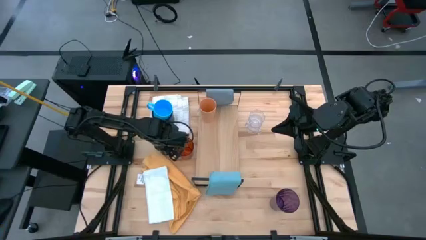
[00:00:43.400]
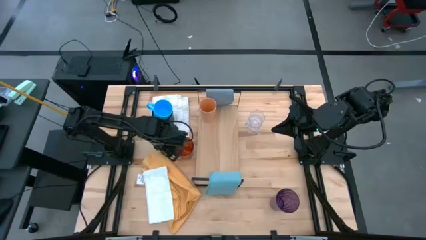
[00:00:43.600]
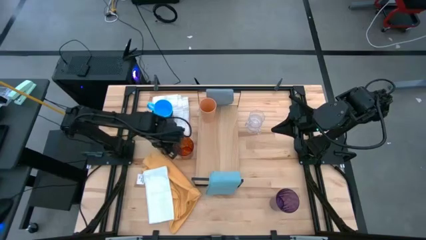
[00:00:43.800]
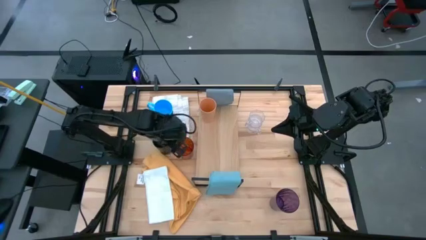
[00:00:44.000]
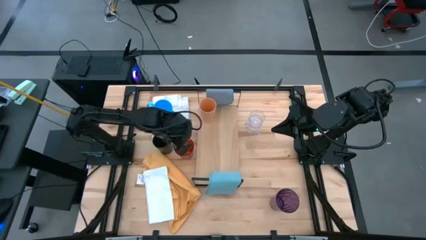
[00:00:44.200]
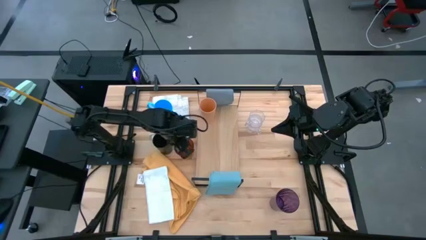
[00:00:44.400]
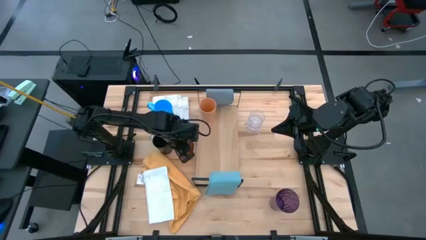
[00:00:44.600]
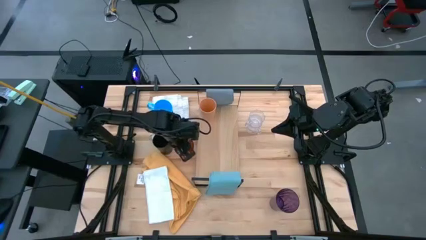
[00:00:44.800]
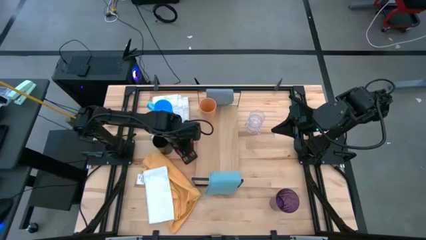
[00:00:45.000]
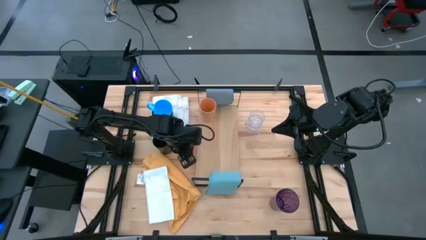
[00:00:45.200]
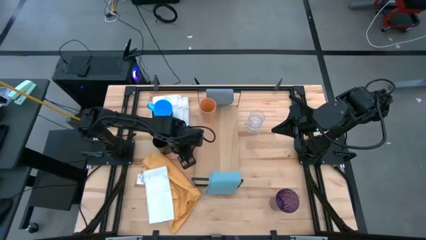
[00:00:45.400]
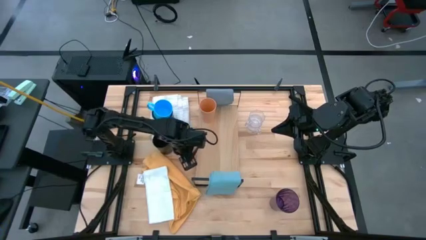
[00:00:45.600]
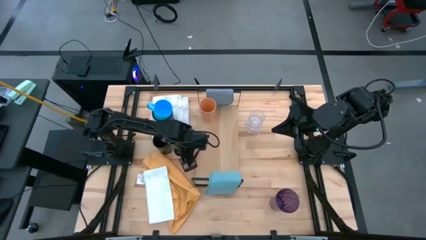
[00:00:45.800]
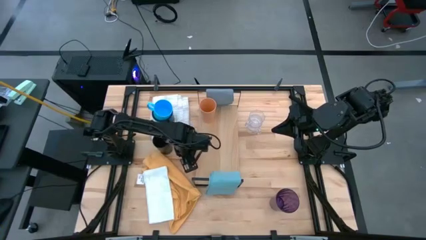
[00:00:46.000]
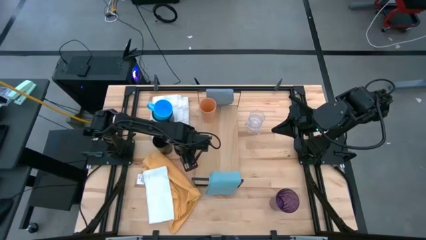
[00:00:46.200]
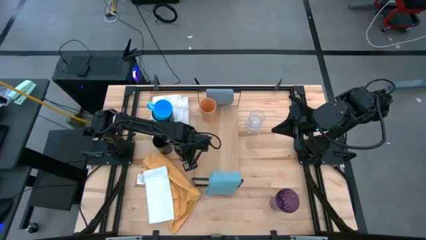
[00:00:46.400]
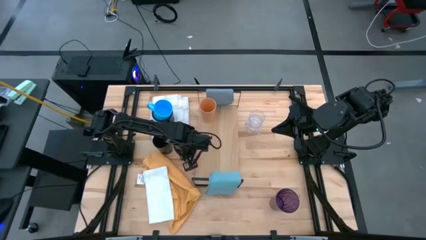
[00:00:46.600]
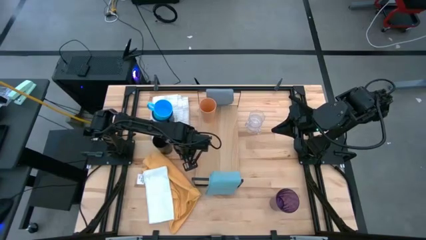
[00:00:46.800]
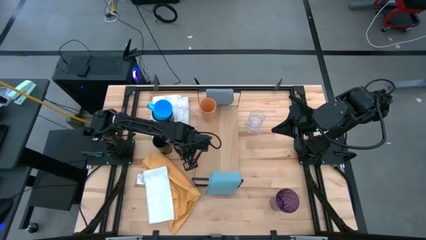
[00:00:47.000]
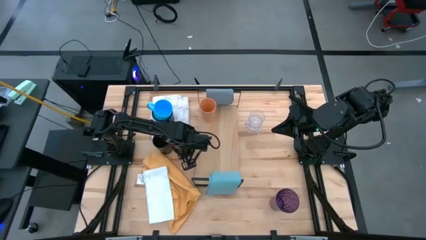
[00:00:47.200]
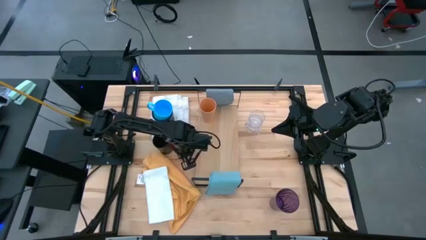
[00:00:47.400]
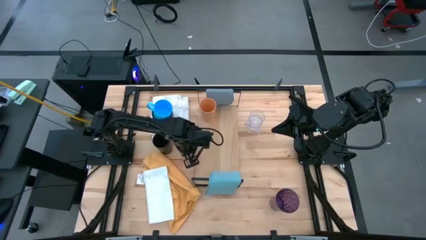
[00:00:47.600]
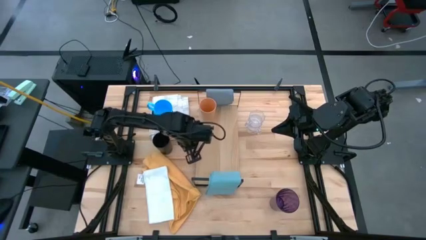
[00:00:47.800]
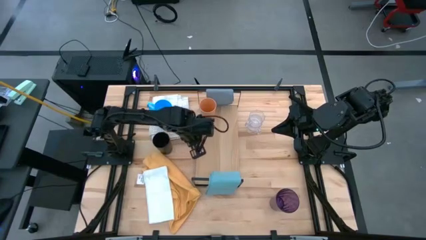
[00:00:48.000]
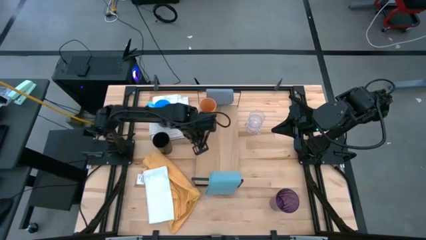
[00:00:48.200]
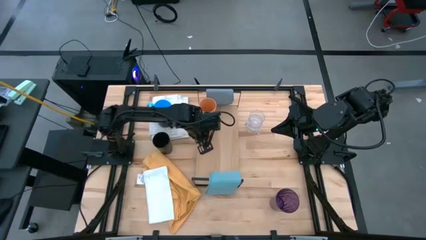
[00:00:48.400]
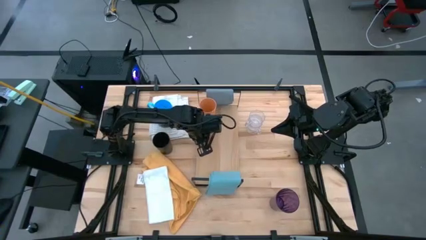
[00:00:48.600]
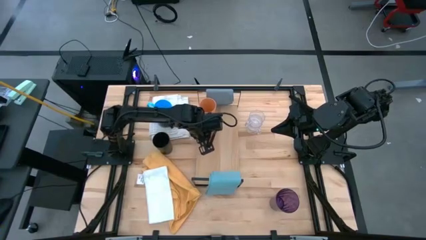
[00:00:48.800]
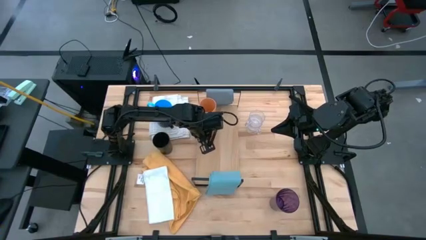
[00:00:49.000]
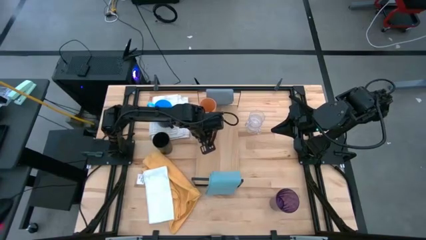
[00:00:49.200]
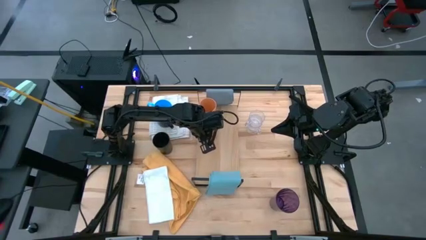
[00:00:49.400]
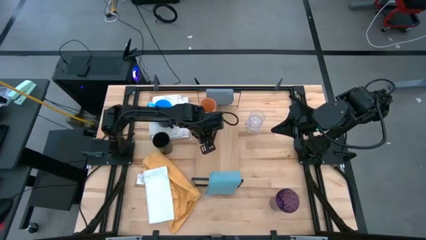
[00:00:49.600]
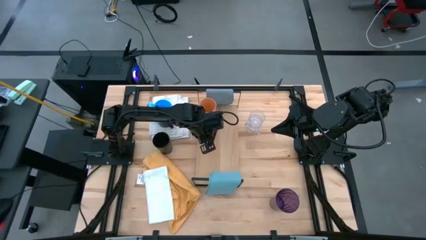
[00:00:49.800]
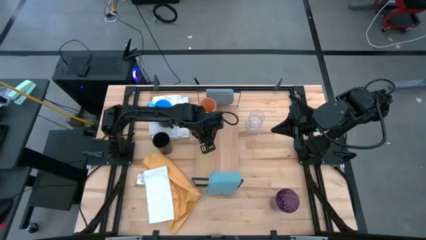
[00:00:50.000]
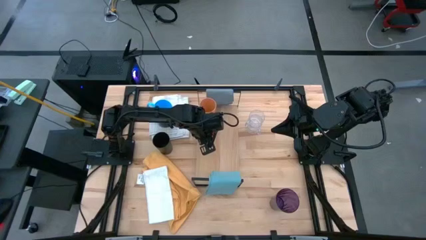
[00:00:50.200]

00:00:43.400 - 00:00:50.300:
Task: Stack small to large cups/mugs on shelf
Put the light orange cup on the shelf

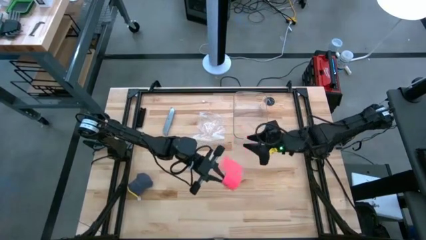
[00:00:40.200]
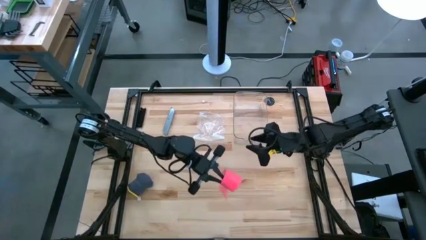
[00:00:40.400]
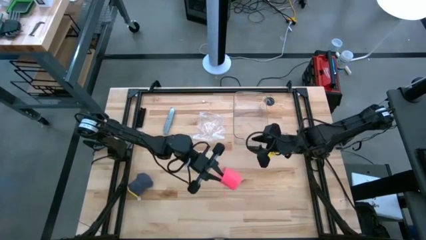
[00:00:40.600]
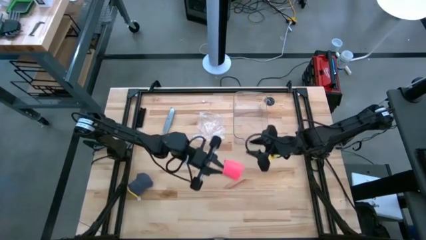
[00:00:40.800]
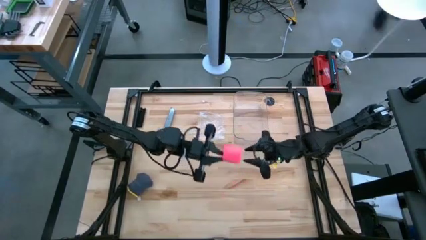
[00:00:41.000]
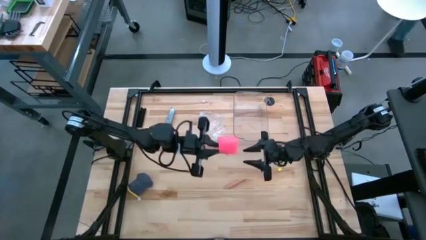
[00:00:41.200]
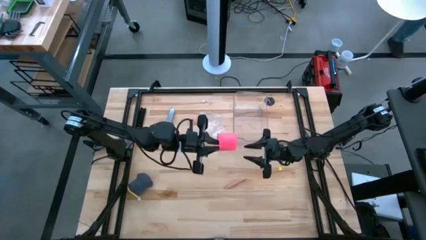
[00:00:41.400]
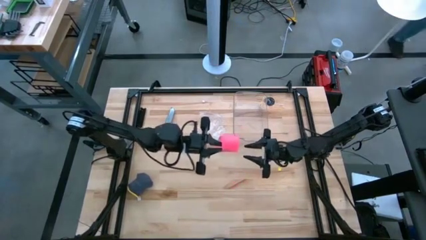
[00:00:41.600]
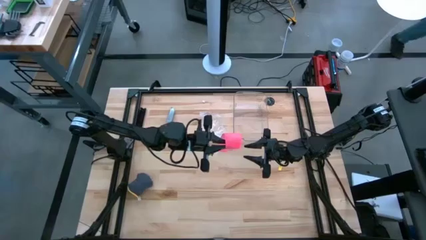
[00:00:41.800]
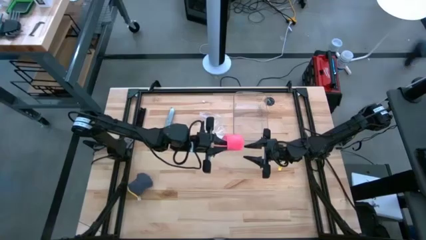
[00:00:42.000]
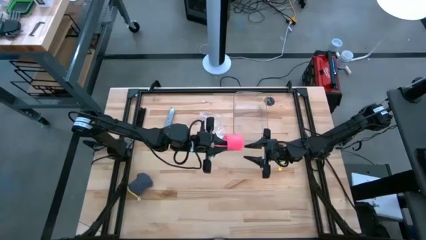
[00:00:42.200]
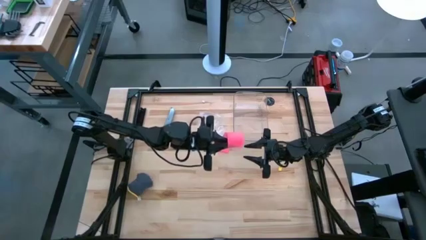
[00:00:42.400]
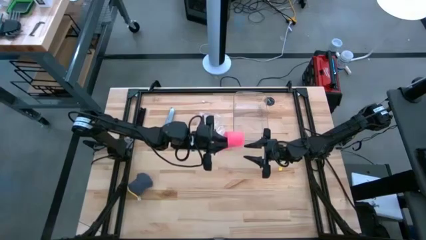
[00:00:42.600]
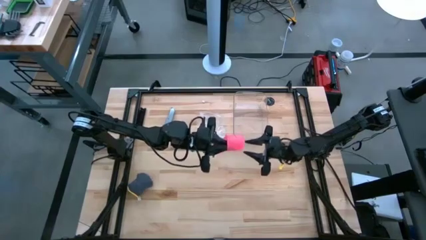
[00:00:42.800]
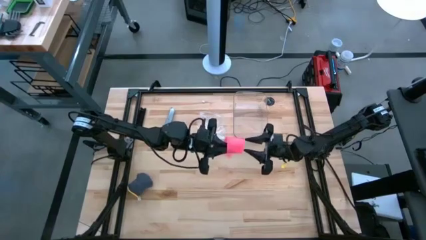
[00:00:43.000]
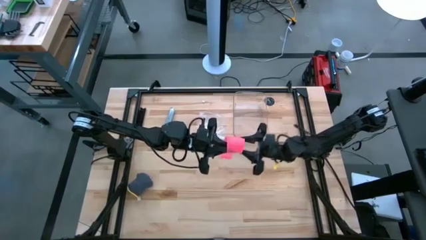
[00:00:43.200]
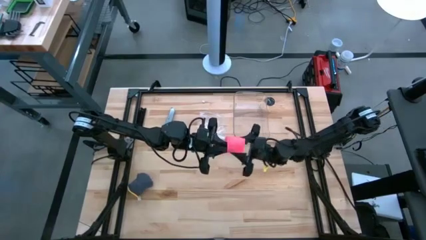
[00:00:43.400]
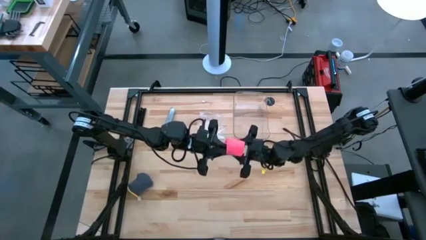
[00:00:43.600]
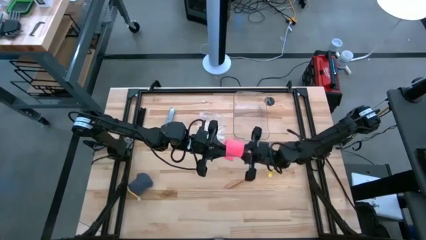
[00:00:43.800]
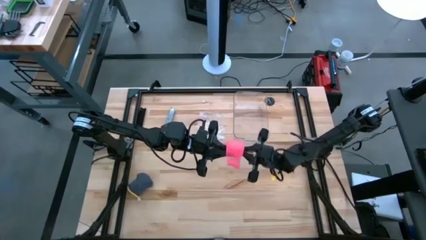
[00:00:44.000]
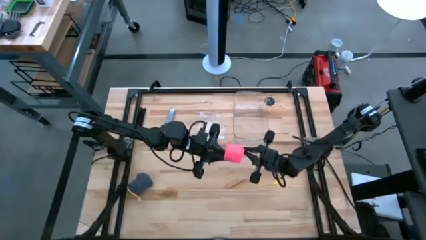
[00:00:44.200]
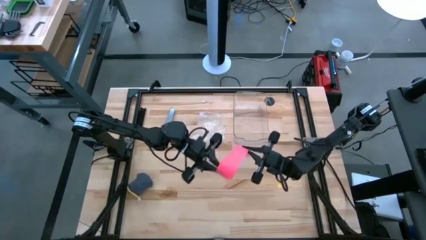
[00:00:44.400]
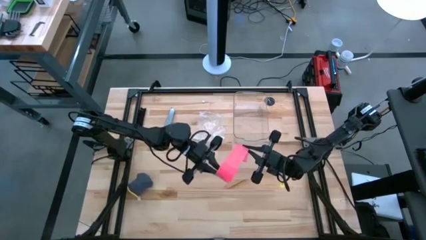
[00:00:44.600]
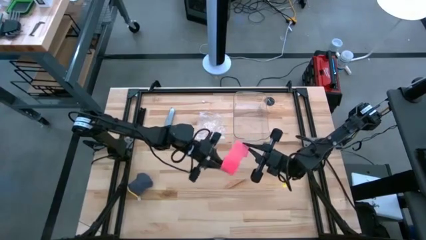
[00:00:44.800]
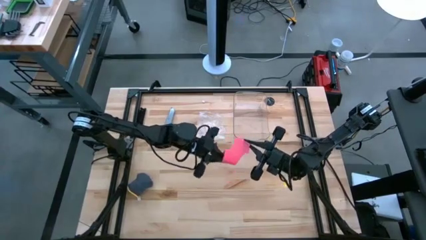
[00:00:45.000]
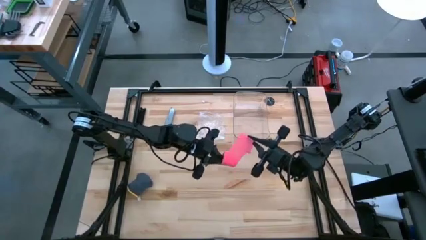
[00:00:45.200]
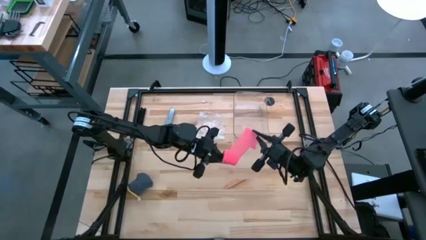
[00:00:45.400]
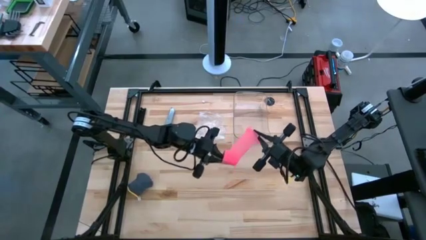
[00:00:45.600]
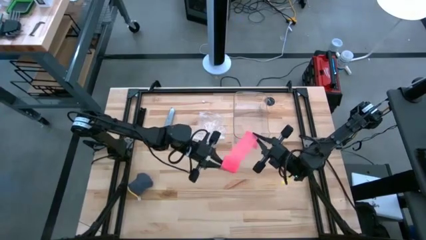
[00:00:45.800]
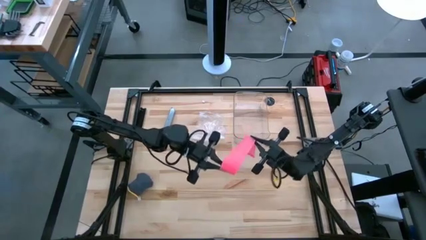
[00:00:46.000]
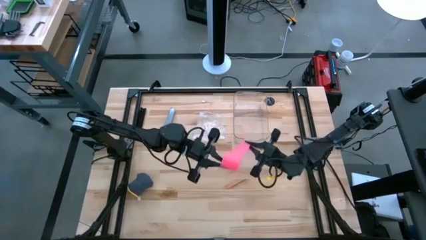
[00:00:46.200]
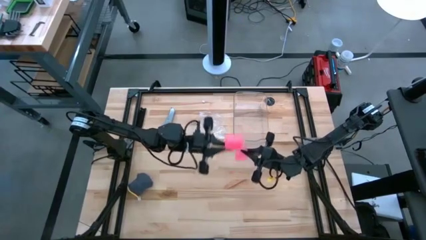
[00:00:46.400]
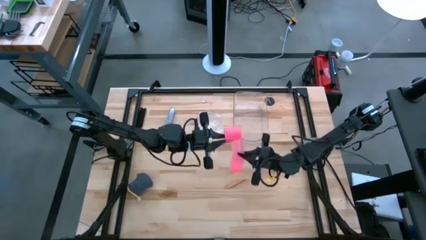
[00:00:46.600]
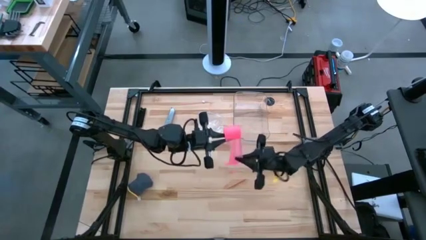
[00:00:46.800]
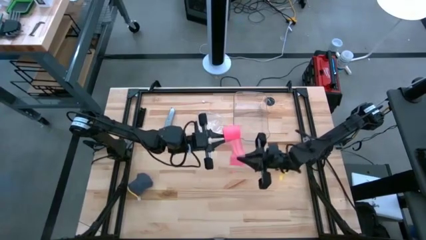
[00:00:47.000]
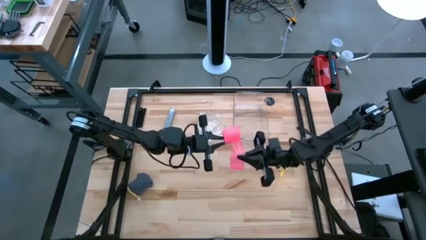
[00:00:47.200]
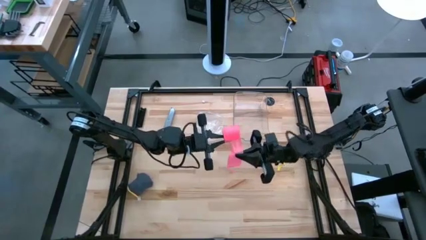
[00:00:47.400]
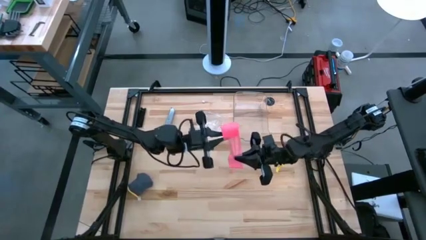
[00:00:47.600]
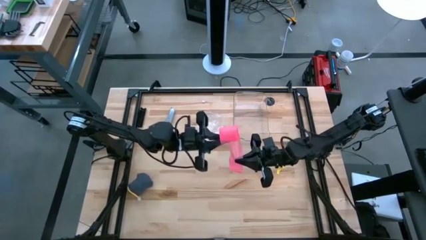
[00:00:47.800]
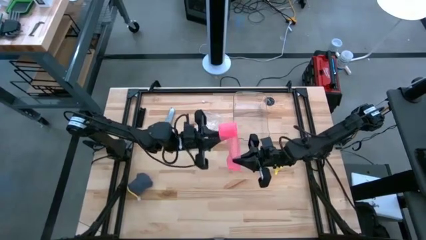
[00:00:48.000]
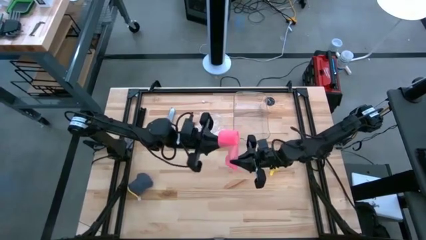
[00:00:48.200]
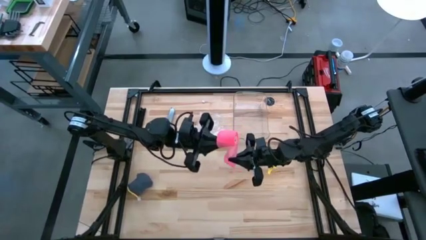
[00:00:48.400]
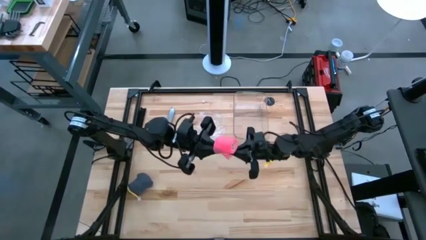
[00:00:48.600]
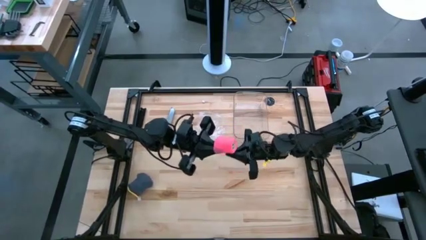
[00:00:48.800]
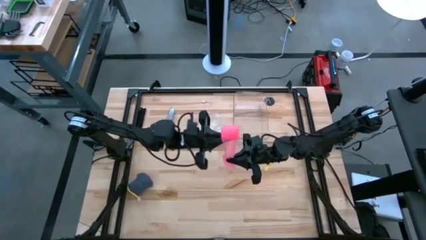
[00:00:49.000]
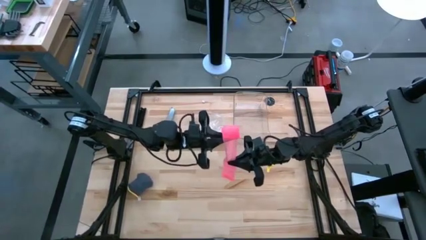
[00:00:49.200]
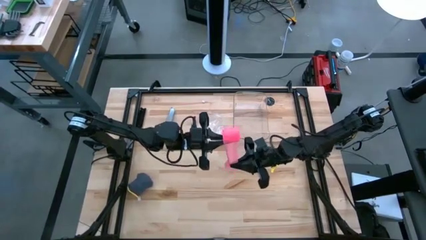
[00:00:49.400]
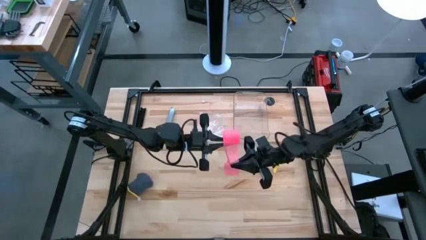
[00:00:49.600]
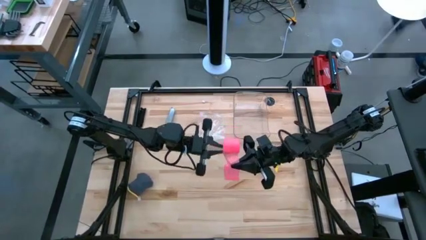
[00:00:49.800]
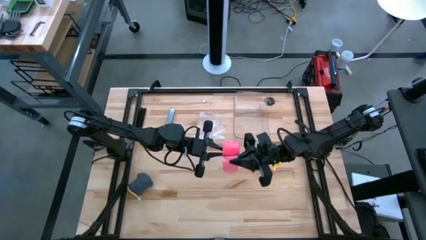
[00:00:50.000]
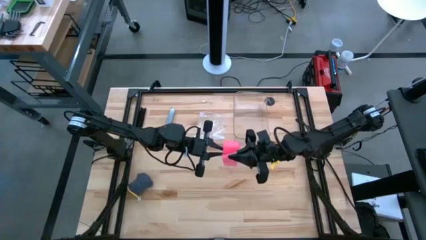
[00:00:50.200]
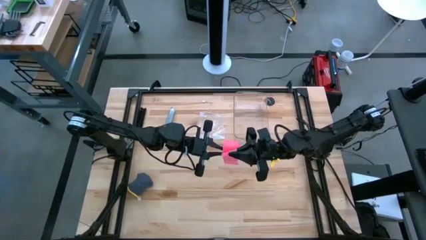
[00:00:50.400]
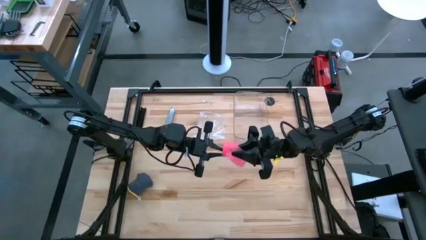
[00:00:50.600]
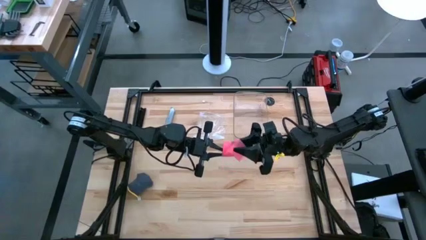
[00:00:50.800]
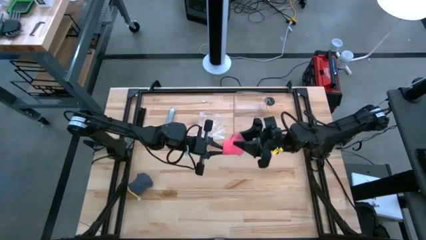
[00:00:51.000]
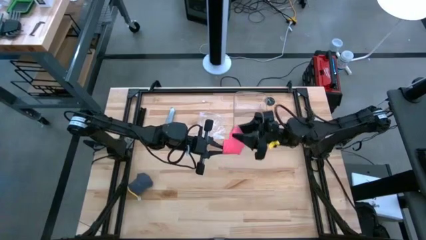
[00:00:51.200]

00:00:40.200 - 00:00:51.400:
Task: Roll bandage
Roll the pink bandage
